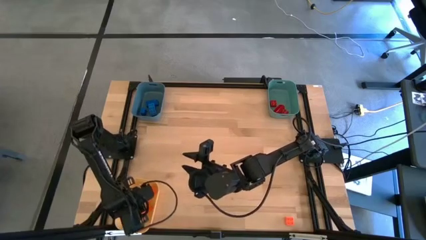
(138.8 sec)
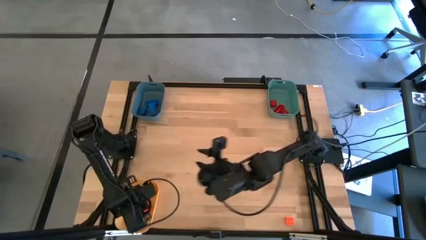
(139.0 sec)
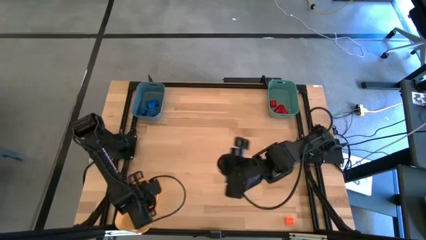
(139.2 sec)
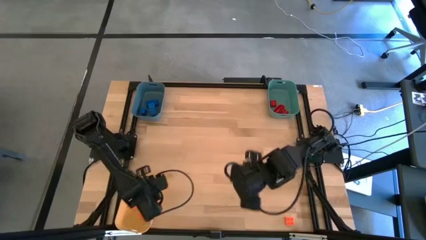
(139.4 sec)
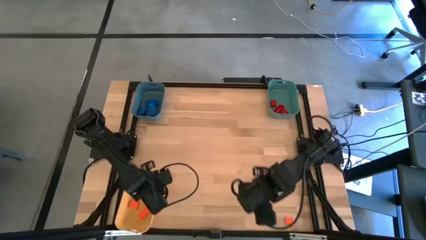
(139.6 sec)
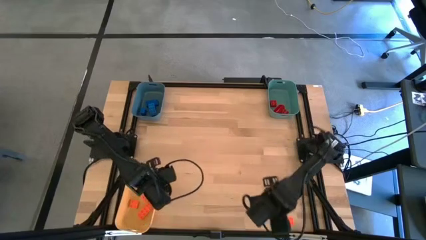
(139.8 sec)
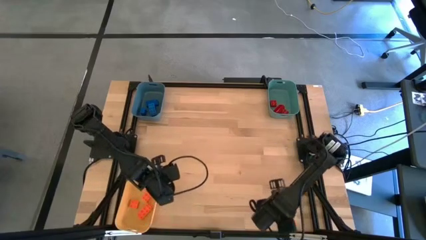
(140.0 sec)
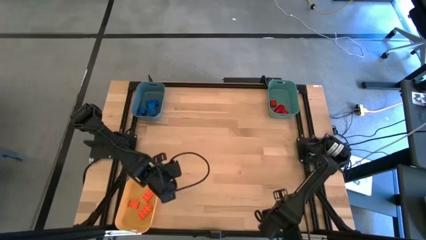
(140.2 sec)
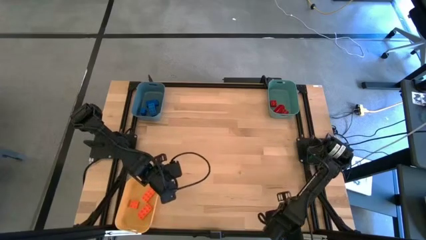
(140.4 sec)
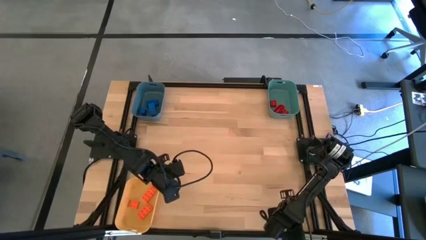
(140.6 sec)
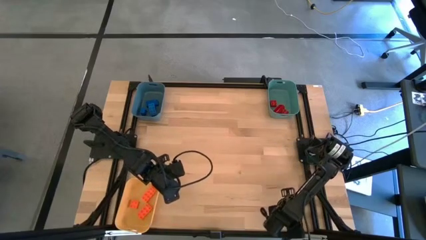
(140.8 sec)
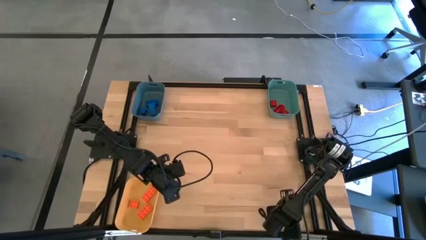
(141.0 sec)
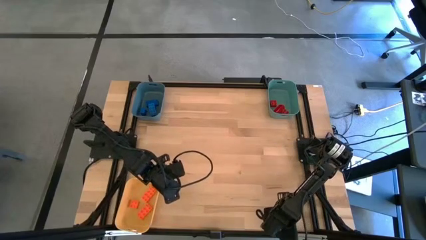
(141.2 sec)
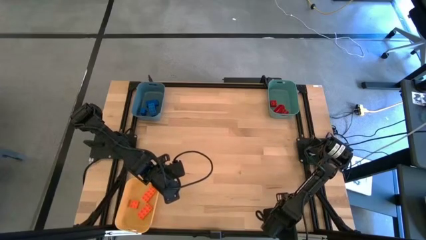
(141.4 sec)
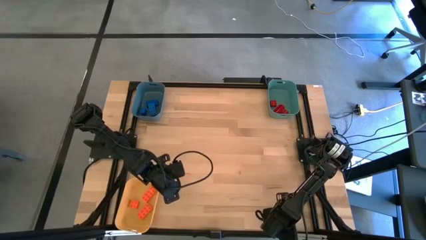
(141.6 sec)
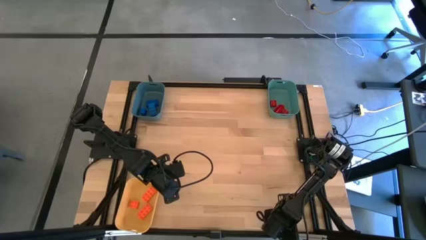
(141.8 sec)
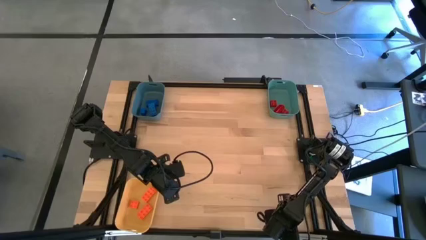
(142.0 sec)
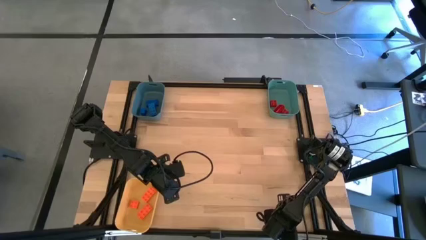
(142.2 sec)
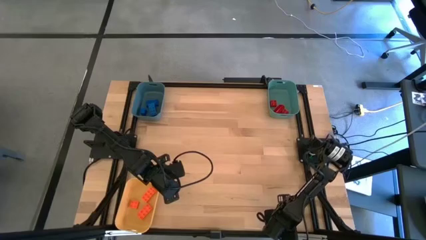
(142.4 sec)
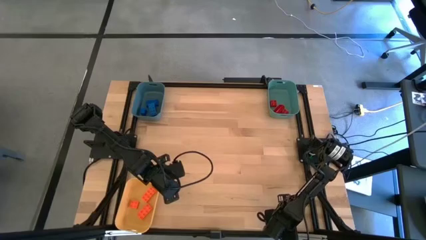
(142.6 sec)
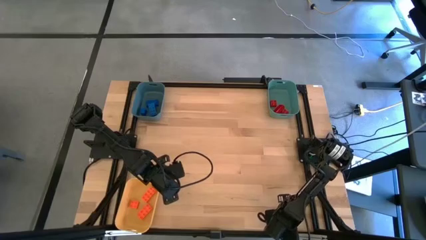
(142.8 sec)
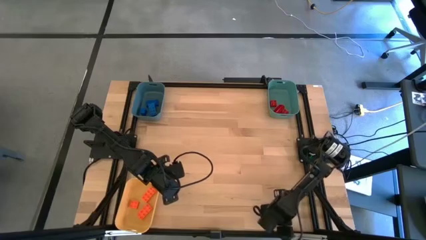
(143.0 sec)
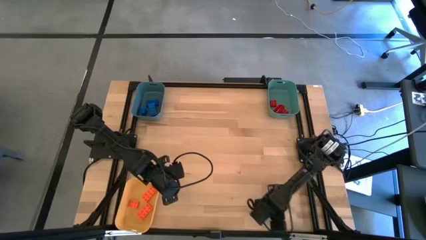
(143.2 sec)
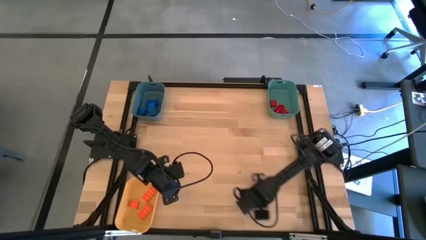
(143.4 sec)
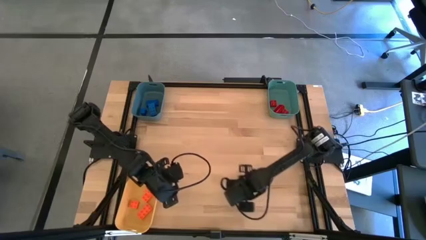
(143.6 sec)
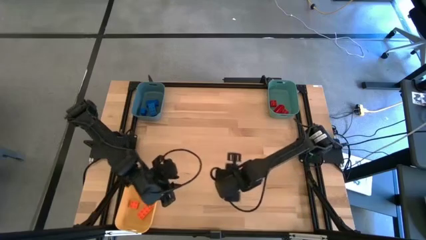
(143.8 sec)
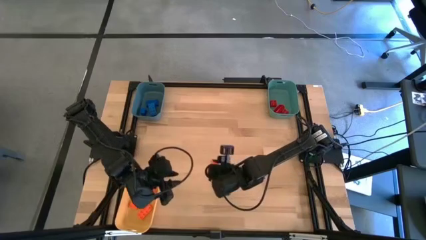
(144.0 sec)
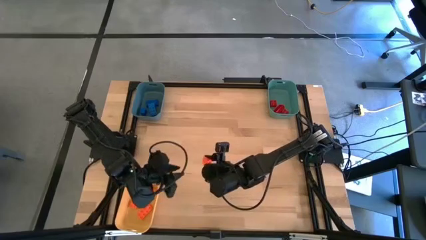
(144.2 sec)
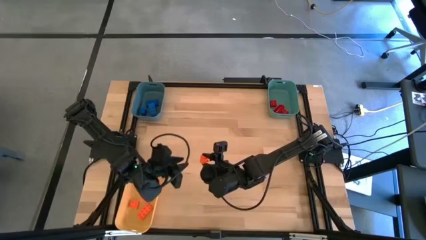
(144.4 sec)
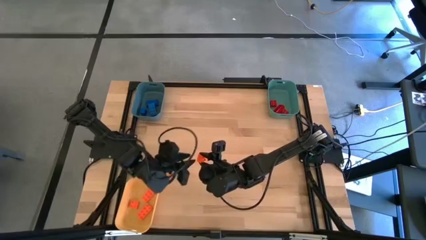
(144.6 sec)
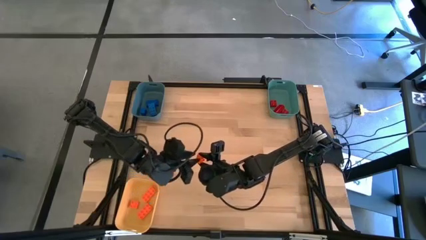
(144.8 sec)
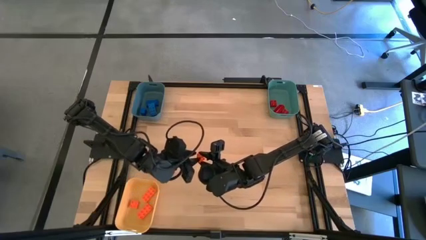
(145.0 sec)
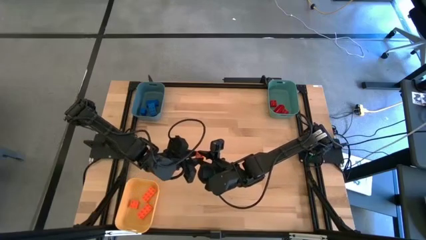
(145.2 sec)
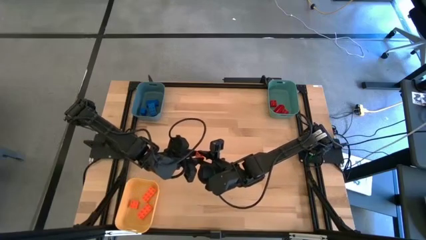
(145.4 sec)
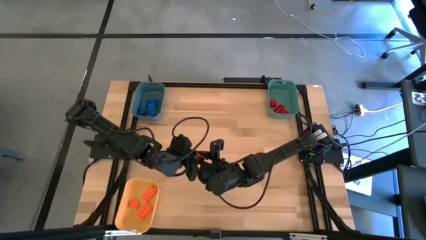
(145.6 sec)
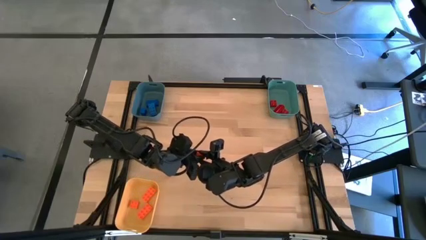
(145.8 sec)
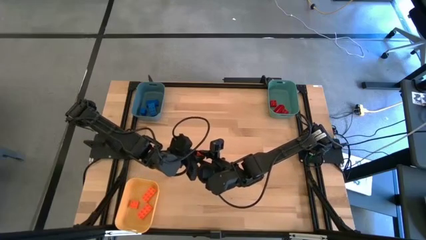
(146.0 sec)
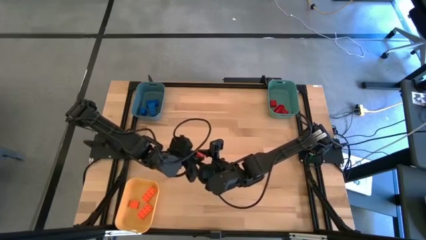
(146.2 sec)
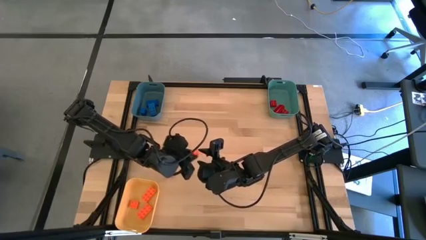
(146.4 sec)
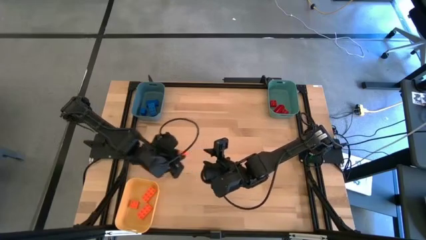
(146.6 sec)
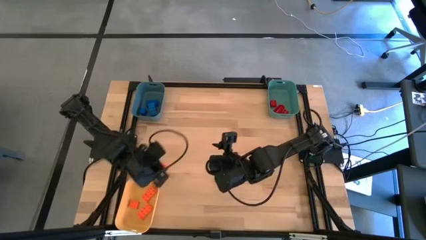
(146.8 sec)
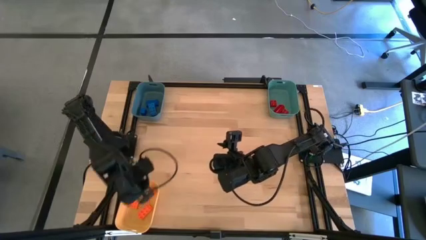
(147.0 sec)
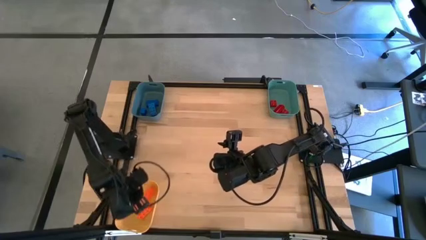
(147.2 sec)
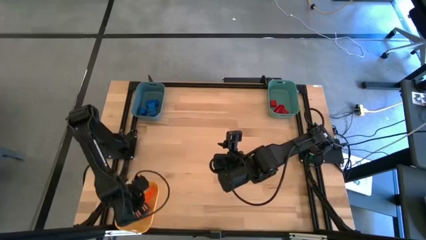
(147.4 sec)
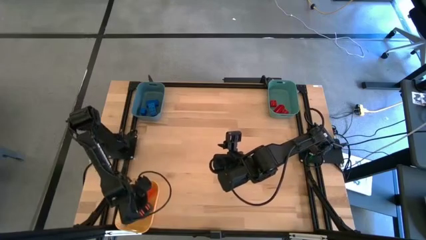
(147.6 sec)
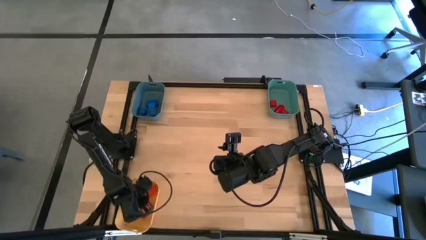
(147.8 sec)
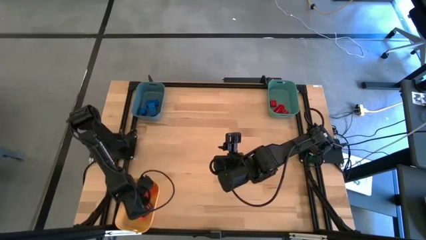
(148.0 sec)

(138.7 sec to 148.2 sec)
Task: Sort & place blocks by color
Put the orange game piece into the yellow bin

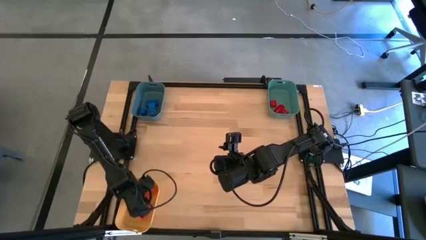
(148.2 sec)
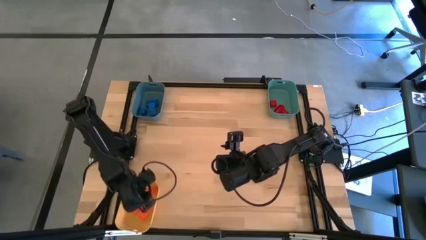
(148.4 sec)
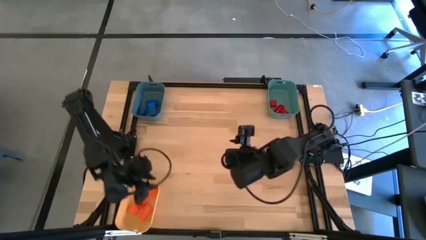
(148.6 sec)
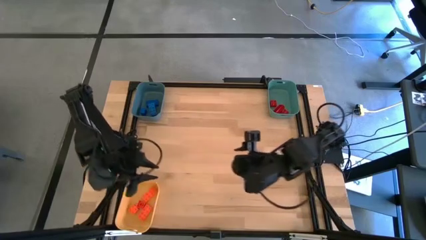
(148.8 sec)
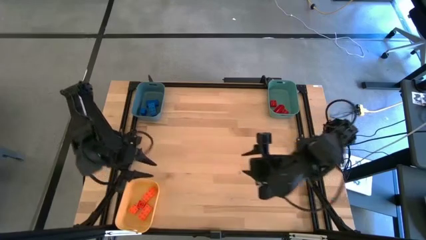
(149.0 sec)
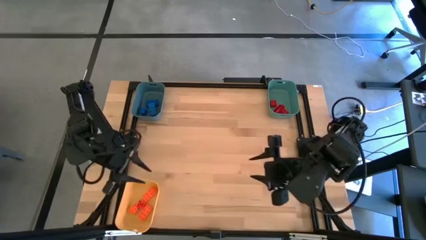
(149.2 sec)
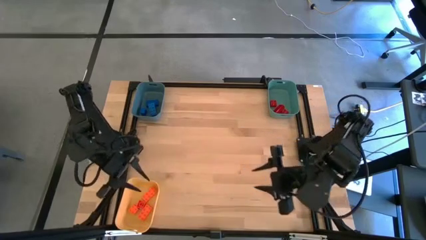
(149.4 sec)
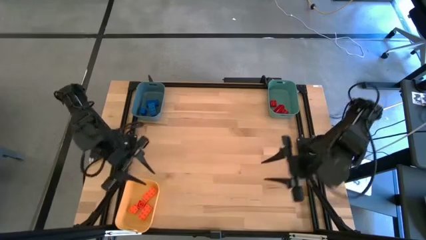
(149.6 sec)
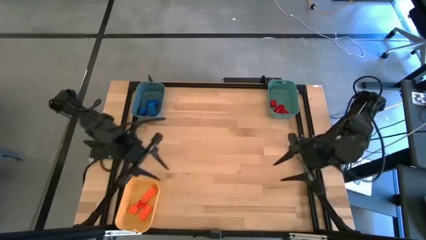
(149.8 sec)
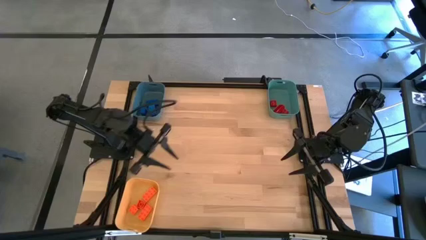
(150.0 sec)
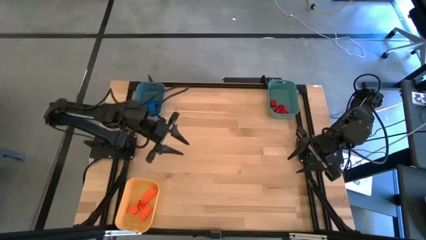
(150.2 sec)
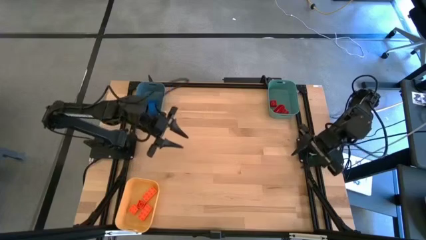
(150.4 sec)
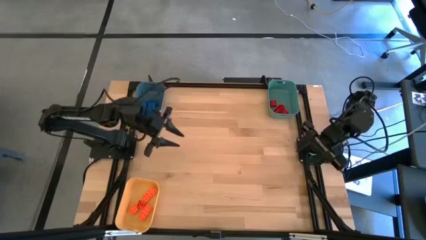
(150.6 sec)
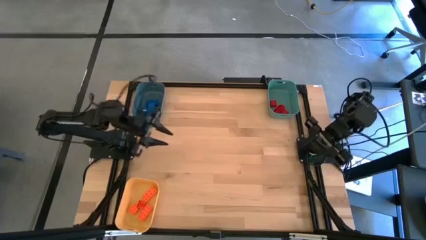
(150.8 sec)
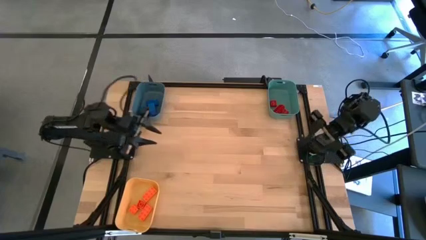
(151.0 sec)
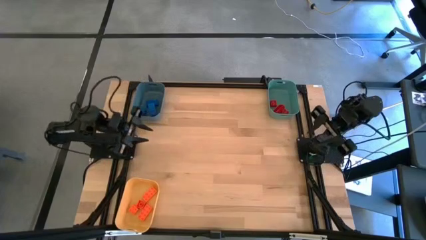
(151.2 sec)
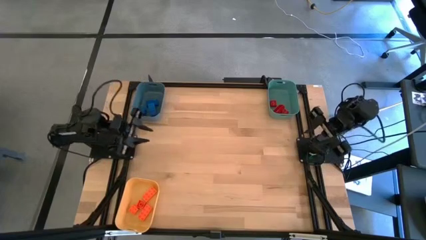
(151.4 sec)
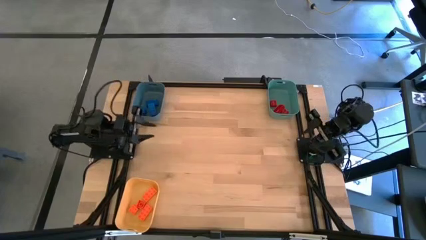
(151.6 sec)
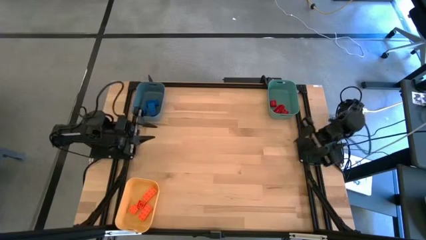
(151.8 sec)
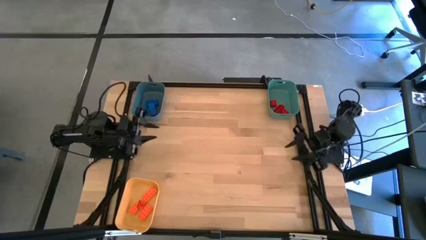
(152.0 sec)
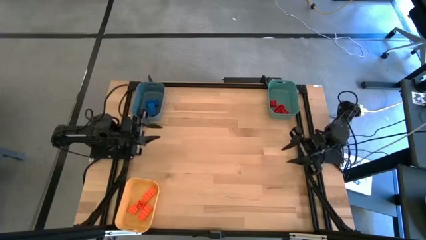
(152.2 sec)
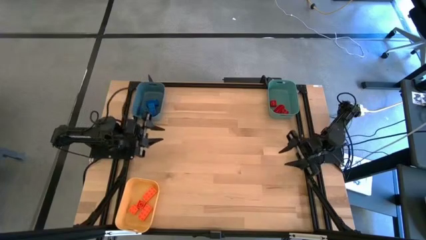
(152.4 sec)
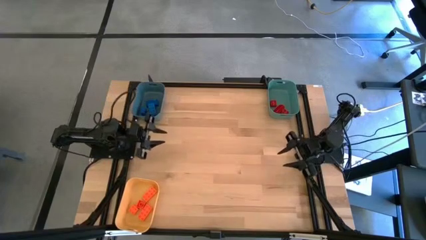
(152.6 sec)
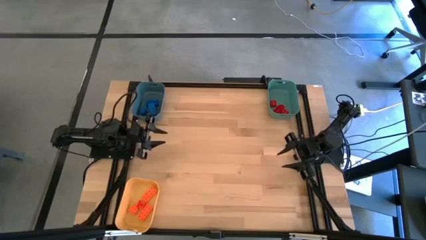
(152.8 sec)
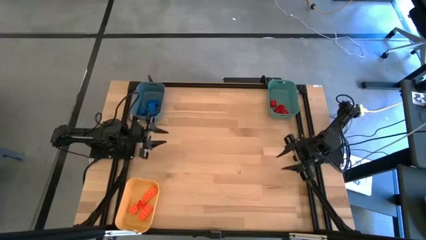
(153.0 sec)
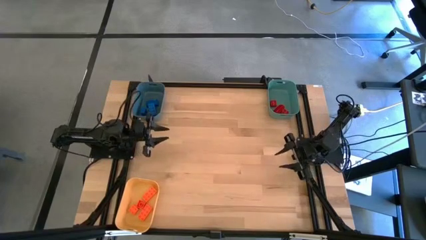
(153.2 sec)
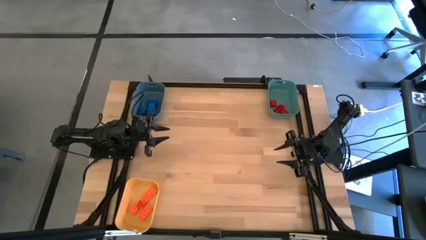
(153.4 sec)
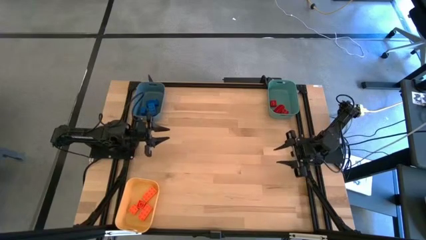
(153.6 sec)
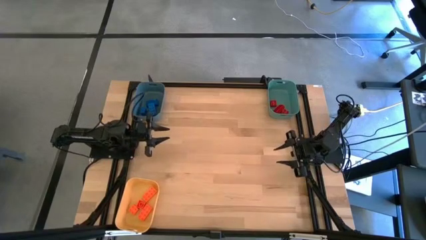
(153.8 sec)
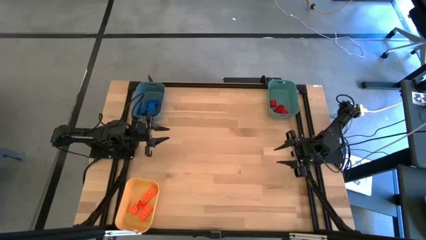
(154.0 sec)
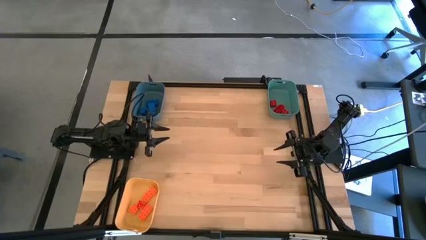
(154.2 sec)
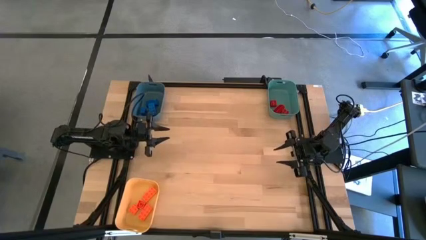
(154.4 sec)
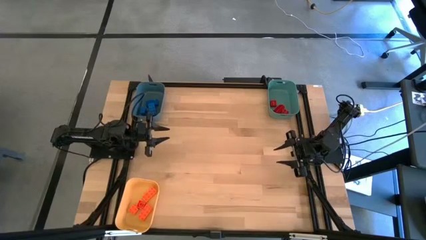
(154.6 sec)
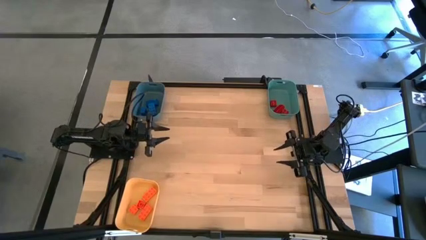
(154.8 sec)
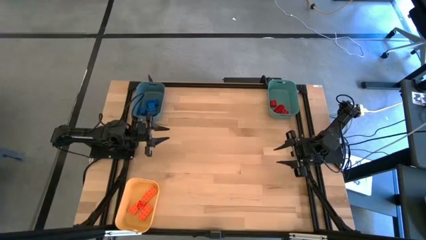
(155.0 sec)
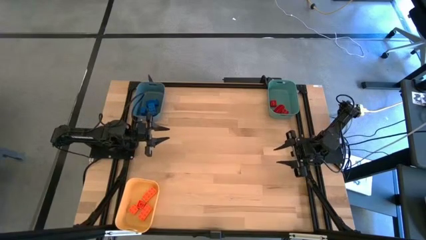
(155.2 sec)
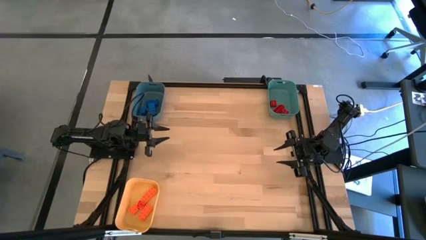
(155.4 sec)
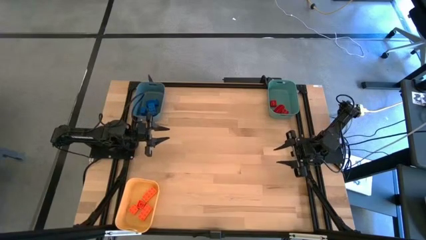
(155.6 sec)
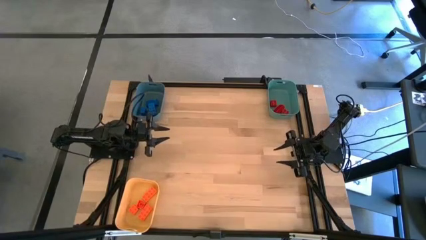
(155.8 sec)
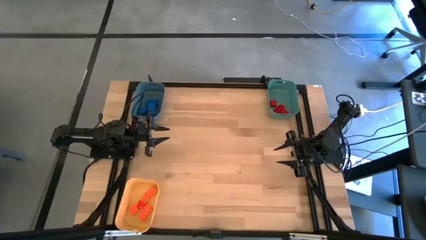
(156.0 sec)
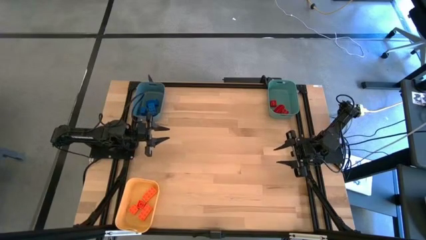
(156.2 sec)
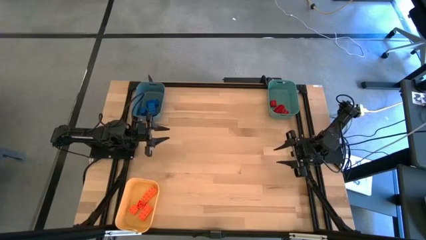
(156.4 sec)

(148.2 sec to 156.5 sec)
Return to Home Position
